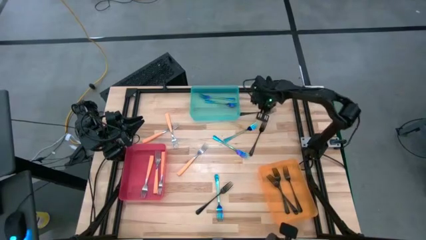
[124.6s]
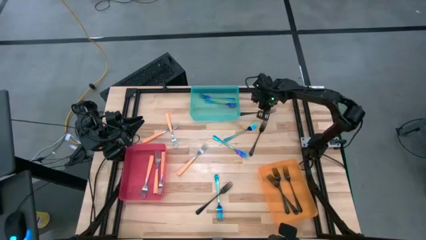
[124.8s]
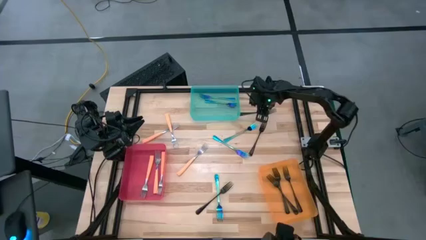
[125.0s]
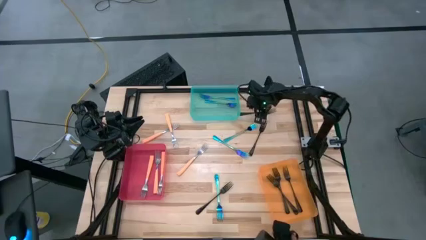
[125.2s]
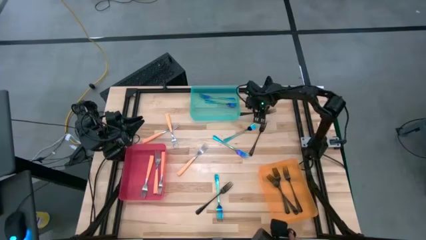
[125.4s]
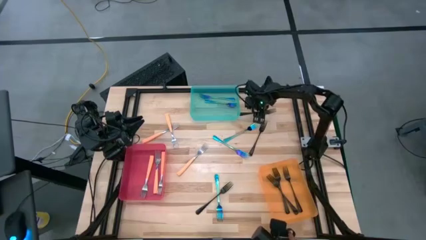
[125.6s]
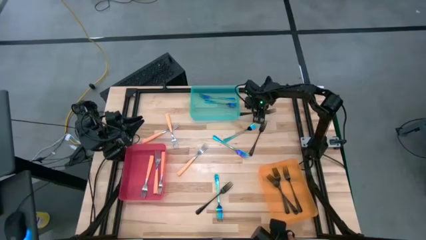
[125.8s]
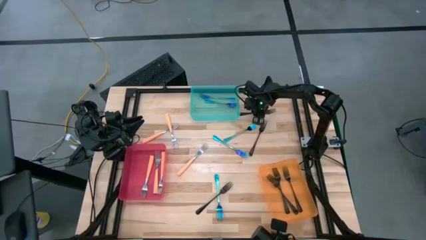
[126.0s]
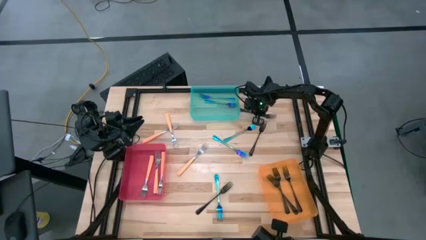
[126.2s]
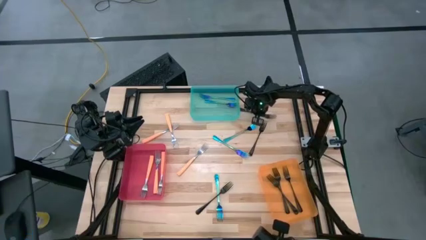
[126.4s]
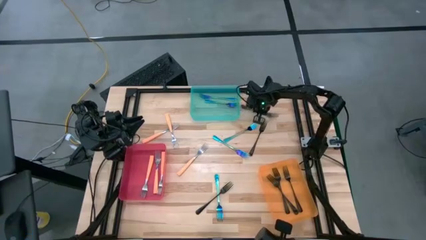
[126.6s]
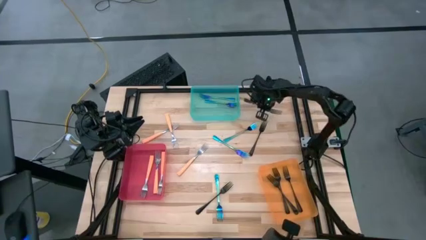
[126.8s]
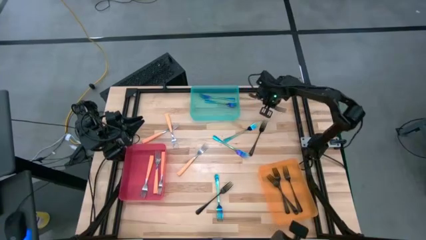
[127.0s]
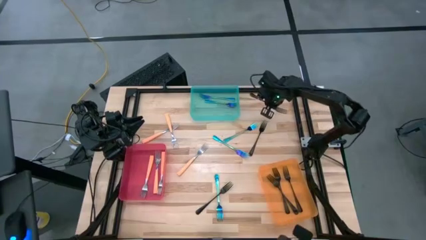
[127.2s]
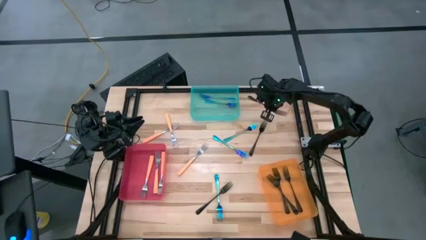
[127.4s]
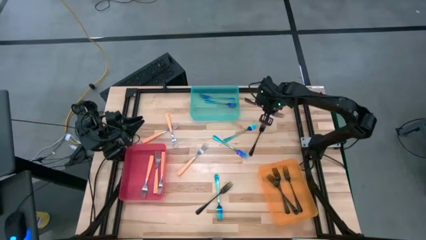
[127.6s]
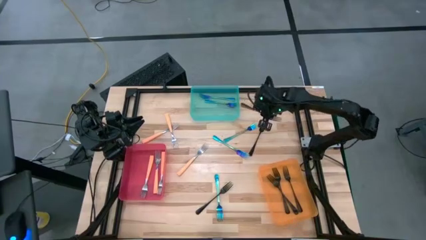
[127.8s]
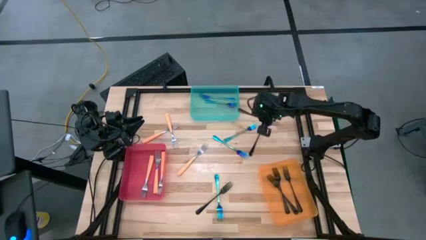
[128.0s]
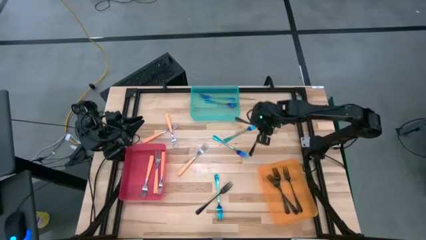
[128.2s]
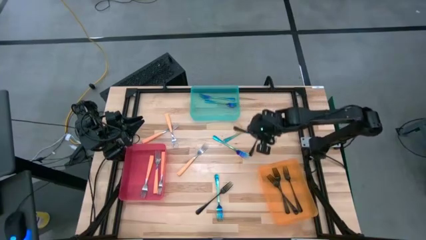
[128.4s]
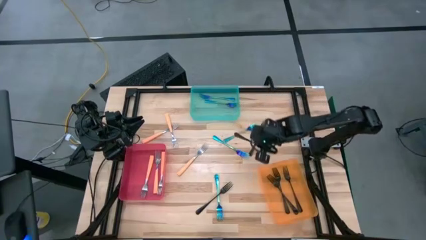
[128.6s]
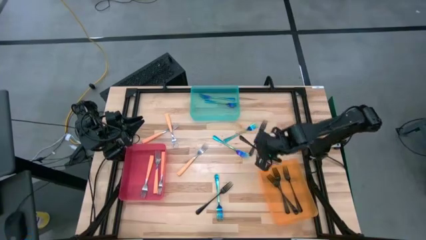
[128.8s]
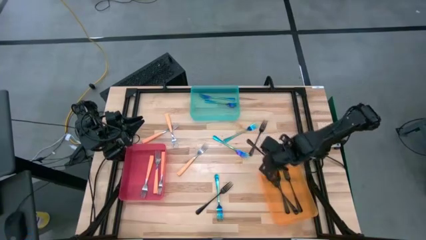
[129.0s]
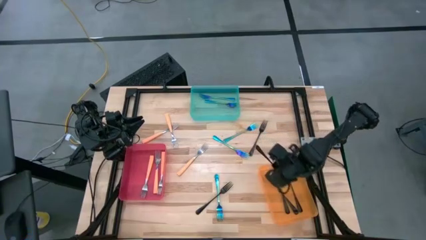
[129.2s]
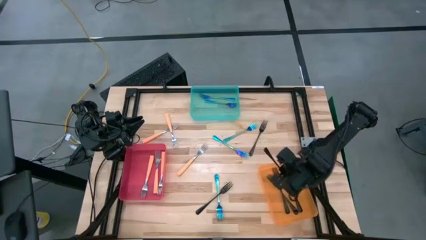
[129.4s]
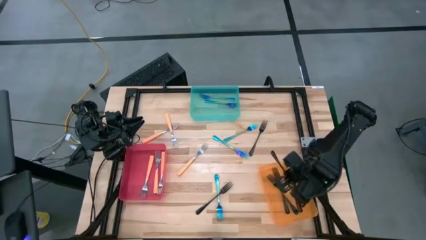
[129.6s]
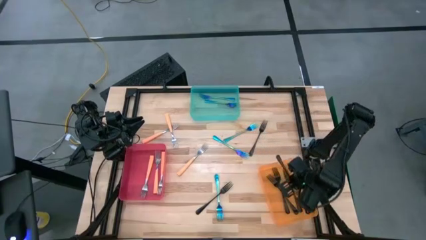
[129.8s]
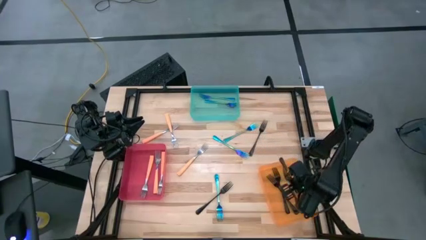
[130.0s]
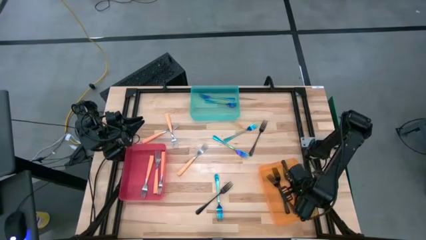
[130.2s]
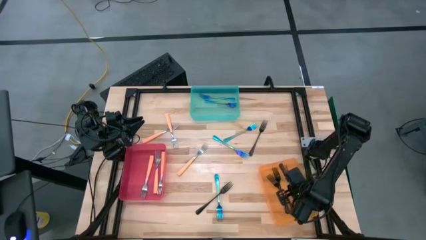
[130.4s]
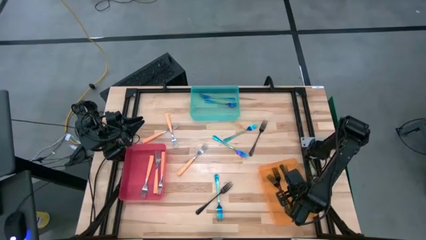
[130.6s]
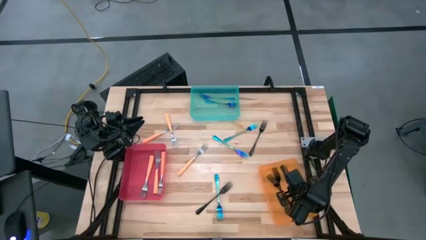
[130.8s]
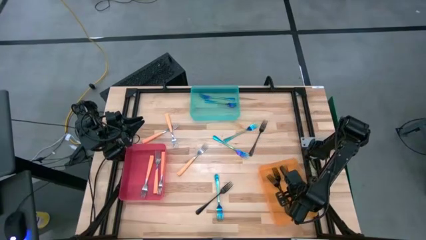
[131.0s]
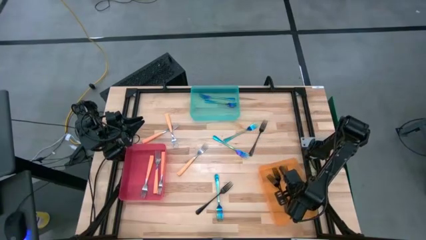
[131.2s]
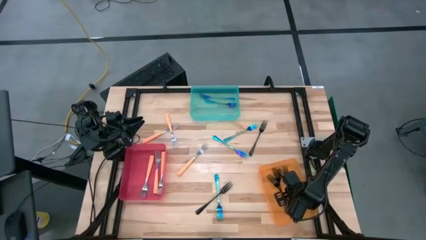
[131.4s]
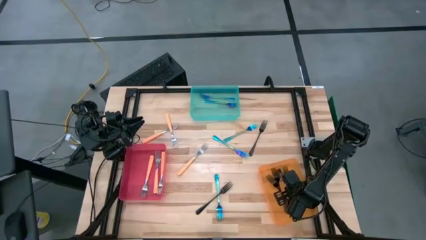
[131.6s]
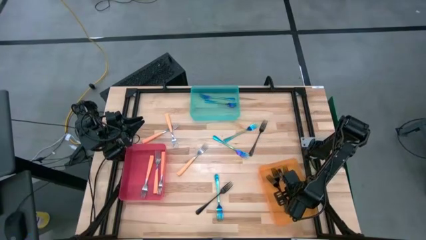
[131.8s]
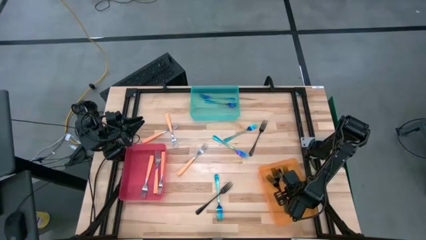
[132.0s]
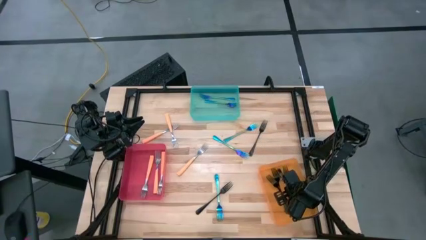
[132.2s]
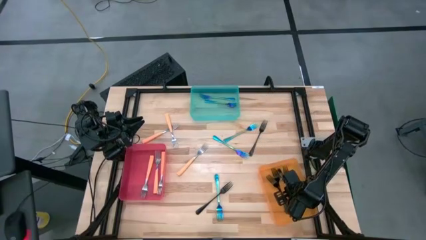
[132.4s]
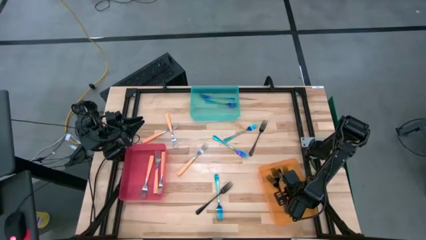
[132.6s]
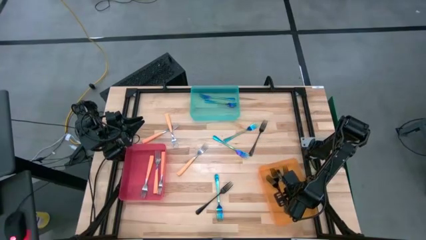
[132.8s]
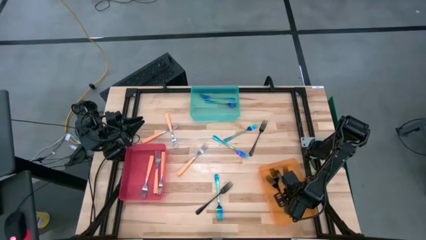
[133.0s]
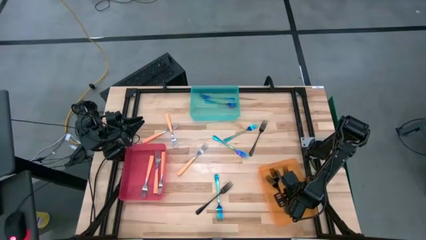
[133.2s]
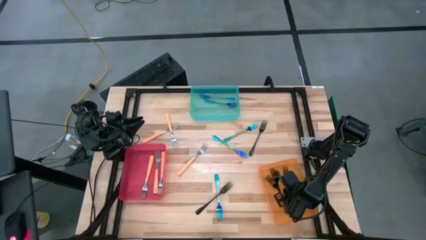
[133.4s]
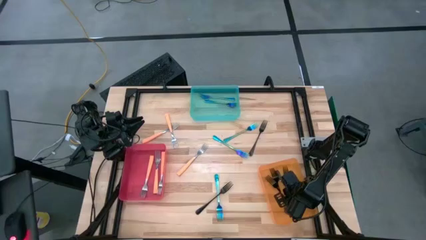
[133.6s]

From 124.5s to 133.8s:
Task: Sort silverware by color (type)
Put the black fork into the orange bin

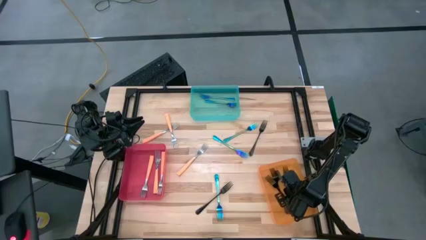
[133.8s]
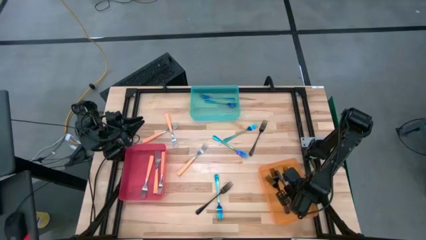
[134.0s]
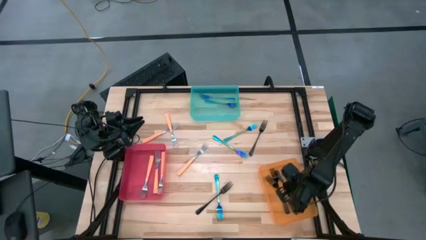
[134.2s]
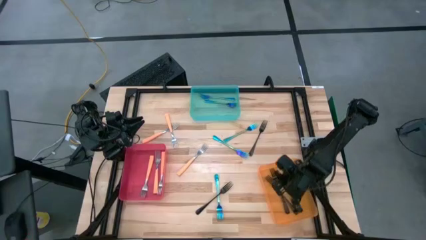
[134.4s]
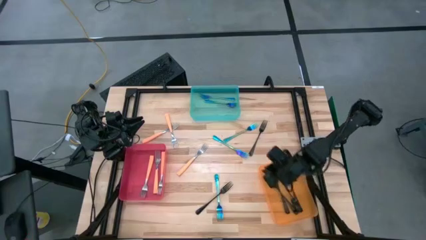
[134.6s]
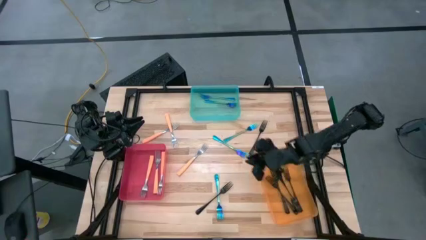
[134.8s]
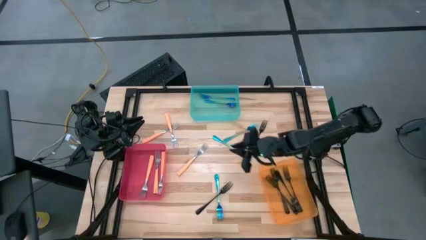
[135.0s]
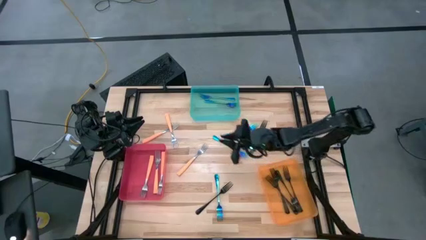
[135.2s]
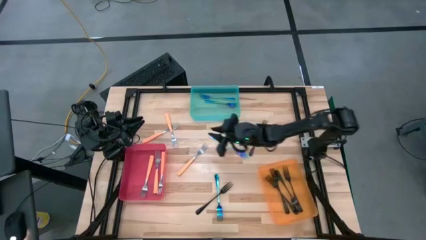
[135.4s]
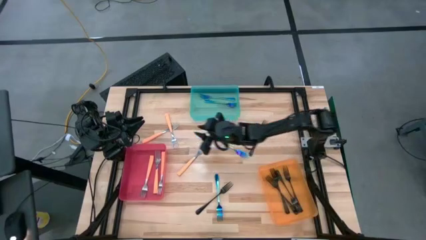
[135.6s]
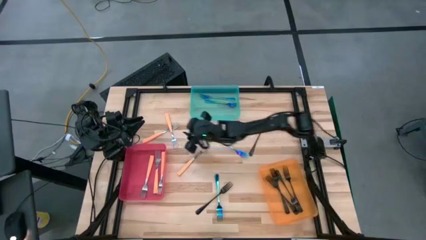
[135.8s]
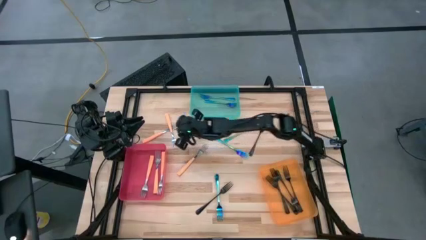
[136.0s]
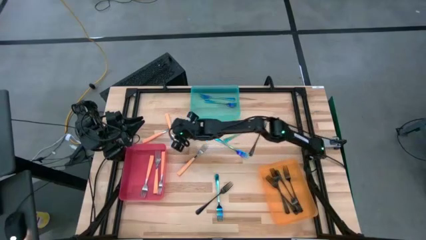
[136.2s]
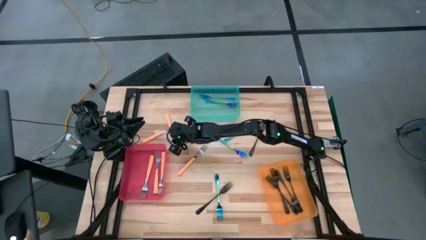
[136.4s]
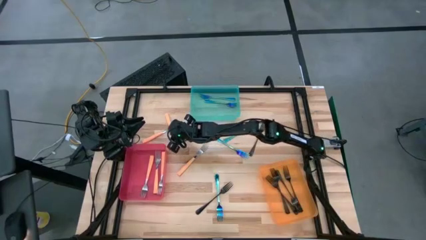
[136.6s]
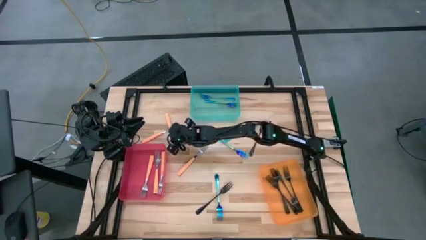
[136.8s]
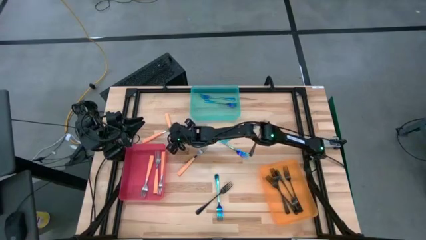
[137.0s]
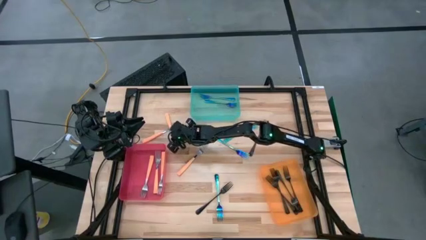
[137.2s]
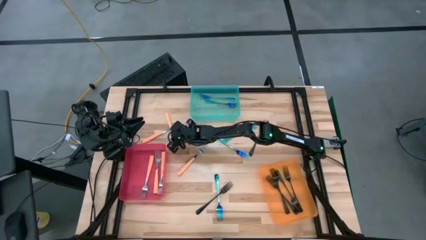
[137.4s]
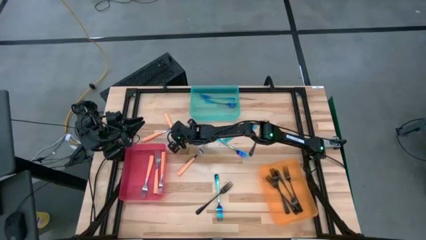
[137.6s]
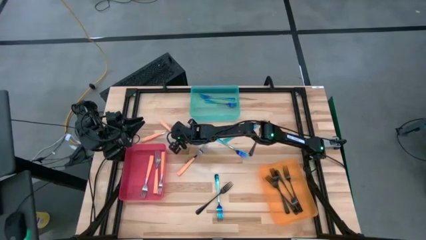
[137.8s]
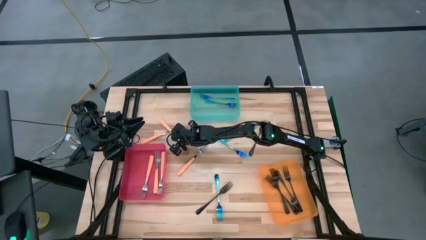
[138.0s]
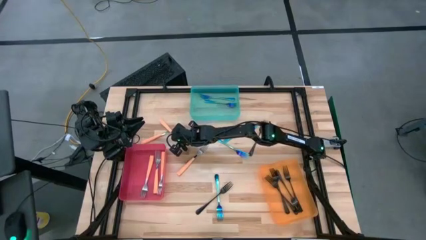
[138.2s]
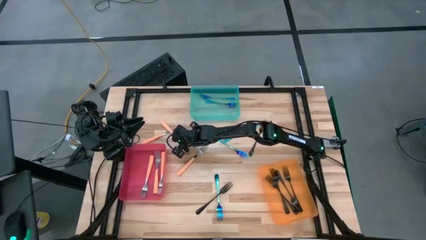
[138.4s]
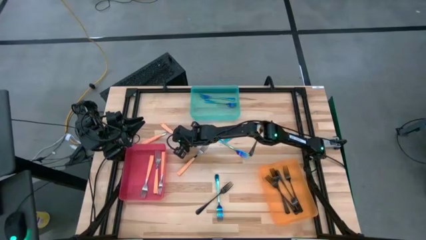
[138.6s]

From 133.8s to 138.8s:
Put the orange fork into the red bin

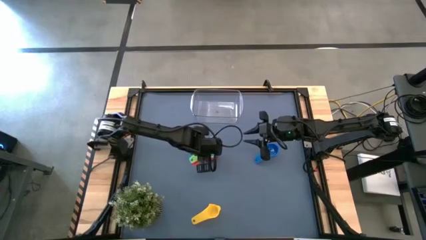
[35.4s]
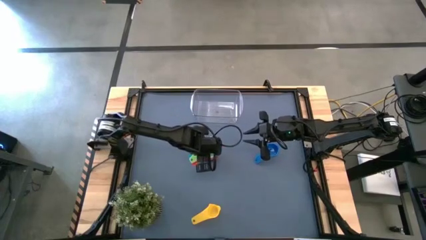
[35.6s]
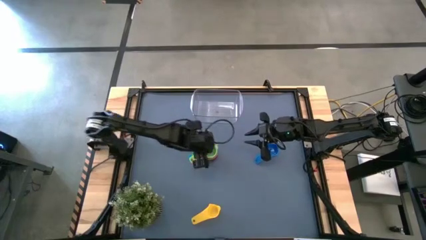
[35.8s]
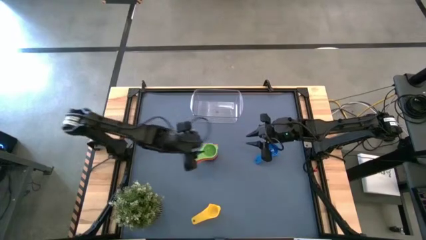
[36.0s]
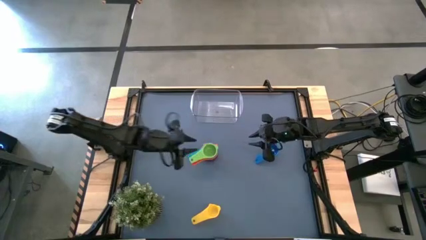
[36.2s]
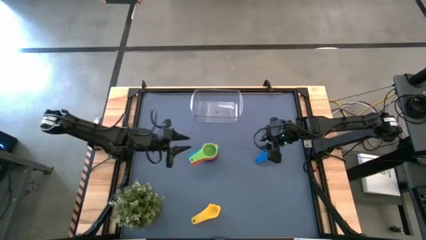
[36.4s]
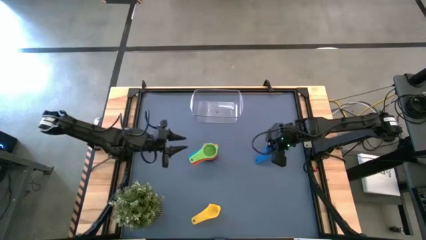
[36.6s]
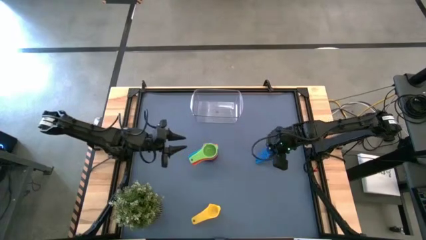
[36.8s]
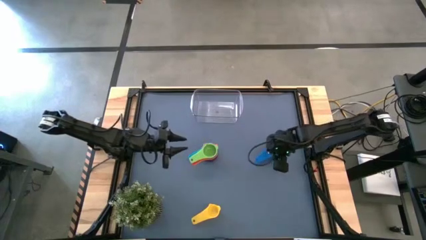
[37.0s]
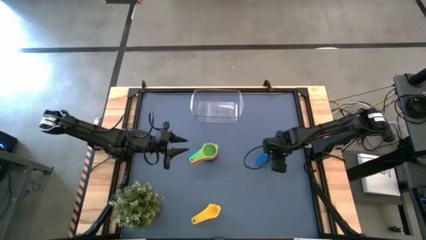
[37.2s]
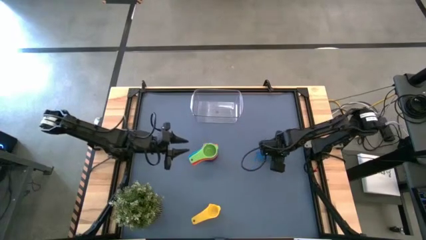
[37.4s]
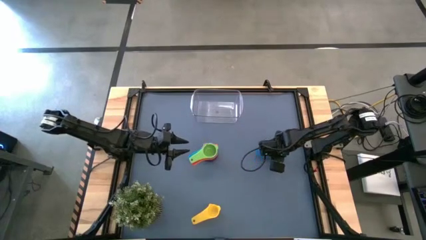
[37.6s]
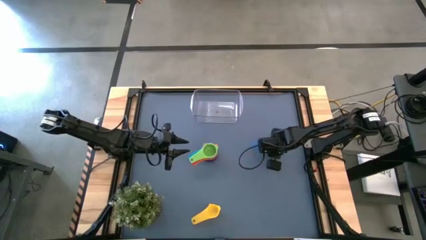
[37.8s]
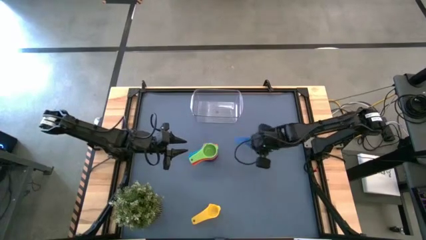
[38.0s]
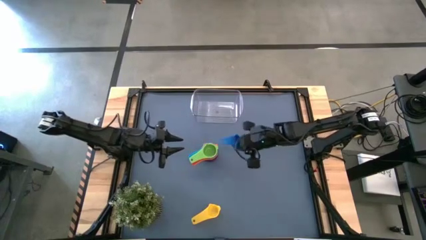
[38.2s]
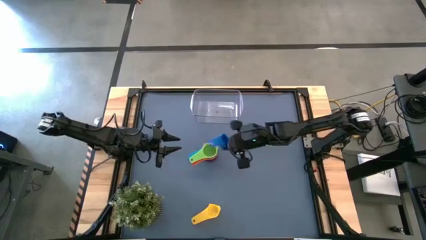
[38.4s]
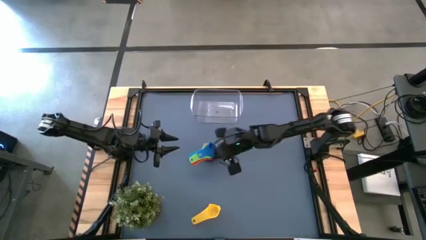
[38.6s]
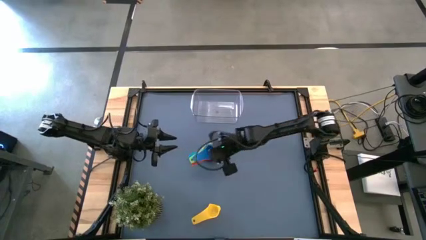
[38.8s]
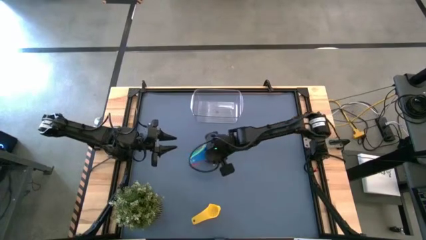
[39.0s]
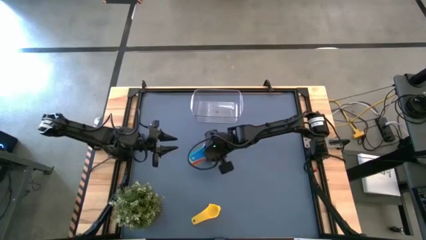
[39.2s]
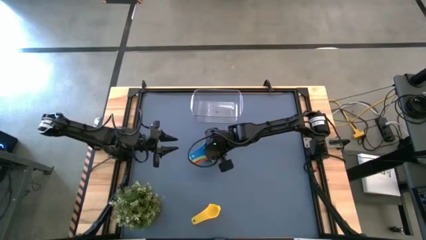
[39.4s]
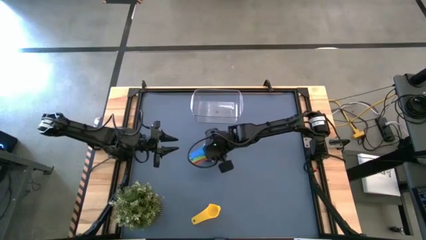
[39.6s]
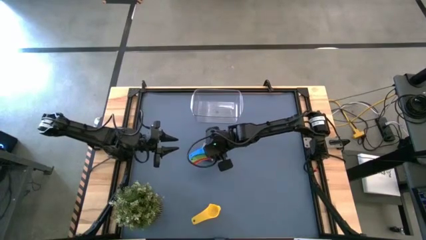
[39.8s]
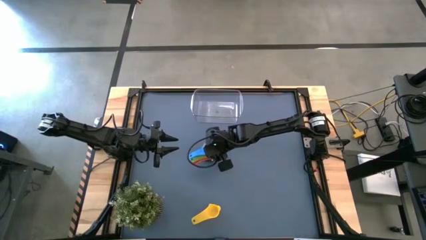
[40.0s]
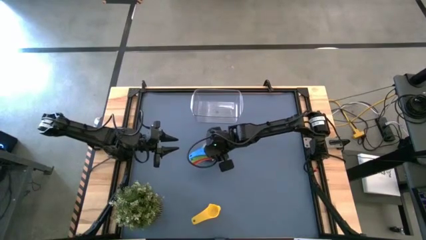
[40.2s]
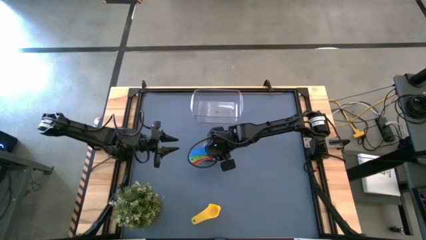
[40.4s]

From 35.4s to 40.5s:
Task: Nest measuring cups in basket
Stack the blue measuring cup on top of the green measuring cup
